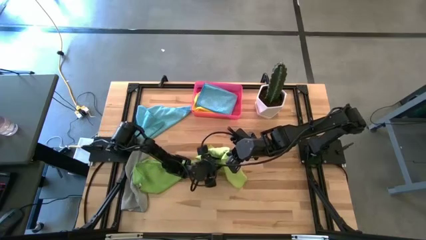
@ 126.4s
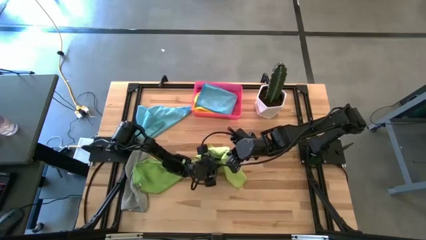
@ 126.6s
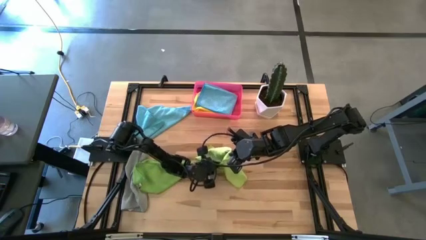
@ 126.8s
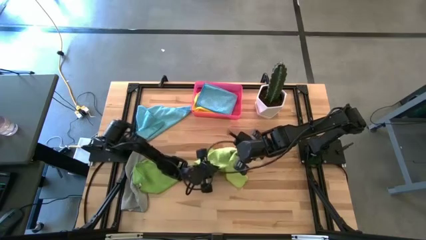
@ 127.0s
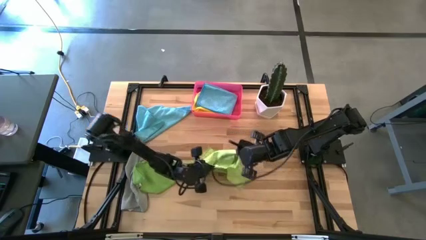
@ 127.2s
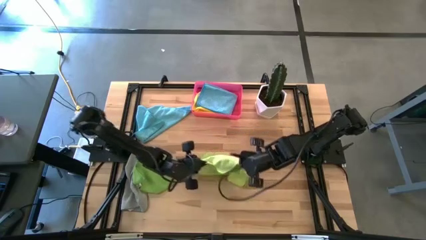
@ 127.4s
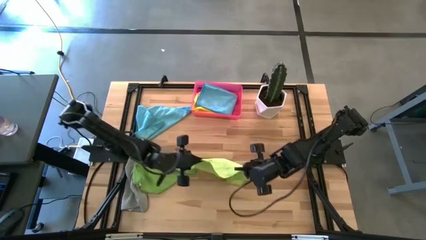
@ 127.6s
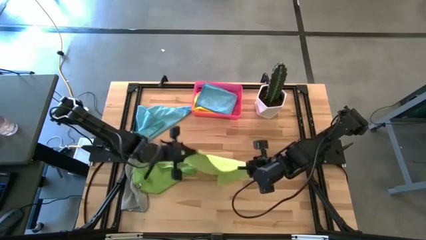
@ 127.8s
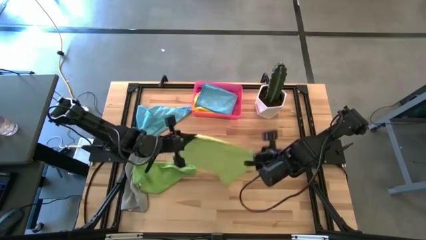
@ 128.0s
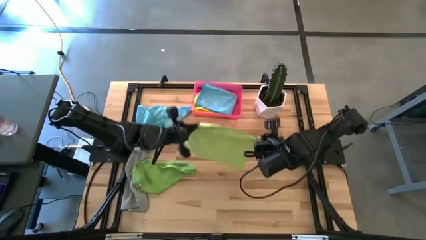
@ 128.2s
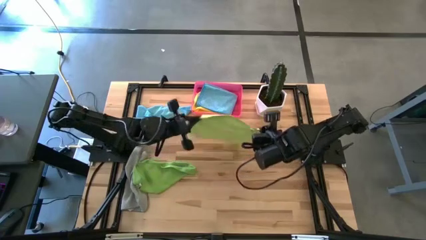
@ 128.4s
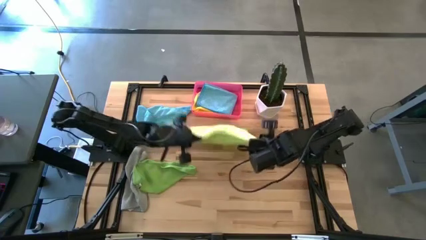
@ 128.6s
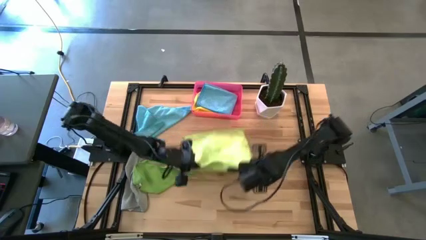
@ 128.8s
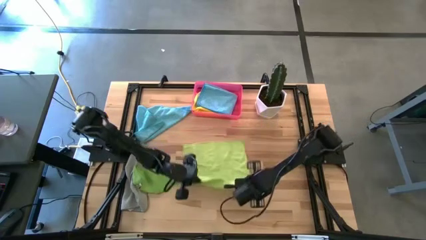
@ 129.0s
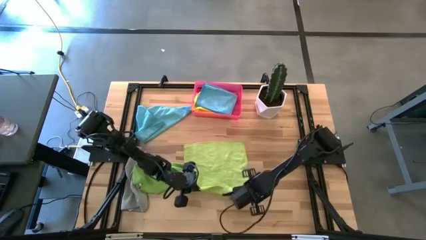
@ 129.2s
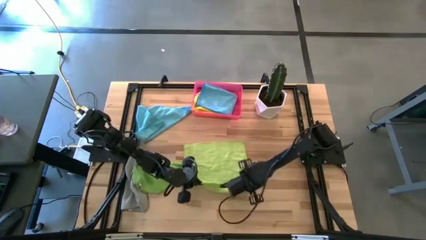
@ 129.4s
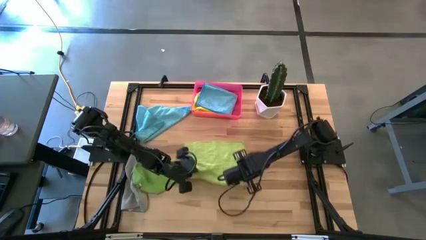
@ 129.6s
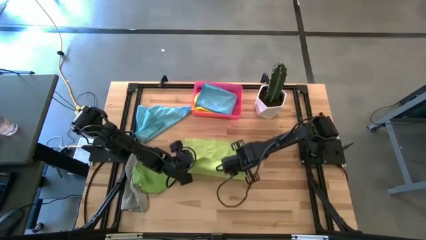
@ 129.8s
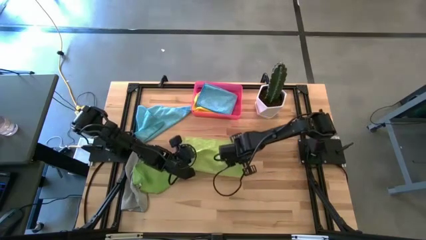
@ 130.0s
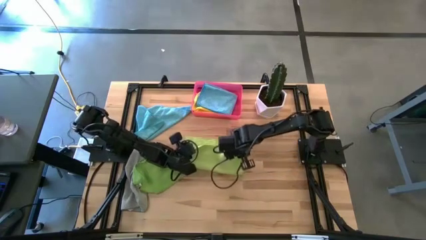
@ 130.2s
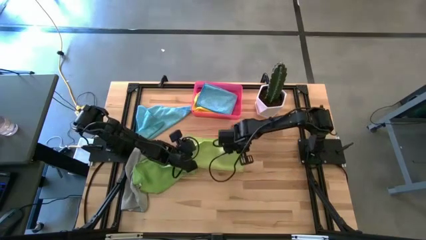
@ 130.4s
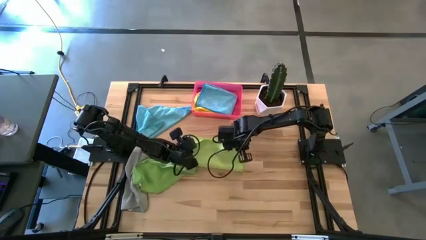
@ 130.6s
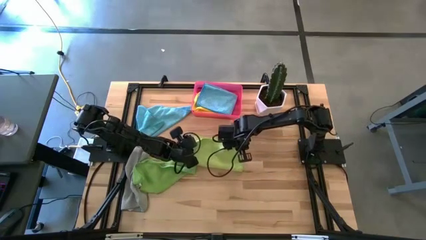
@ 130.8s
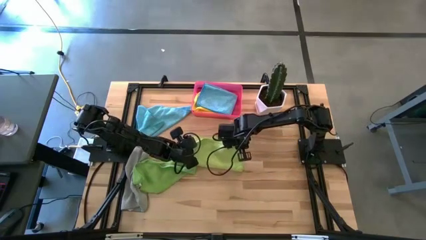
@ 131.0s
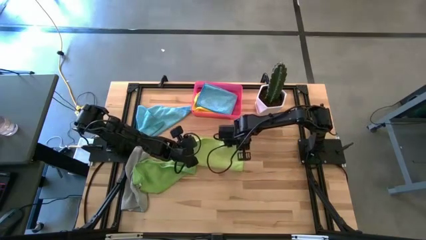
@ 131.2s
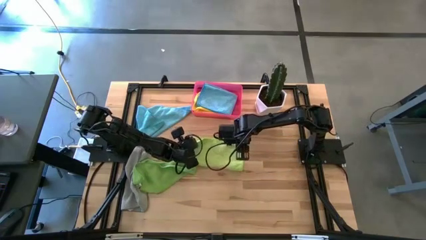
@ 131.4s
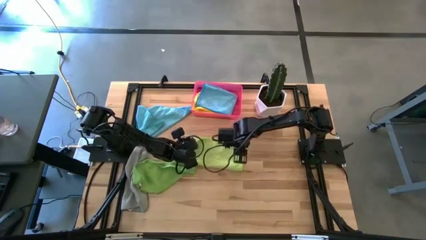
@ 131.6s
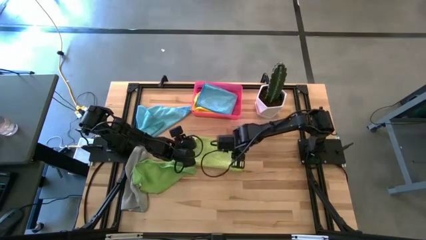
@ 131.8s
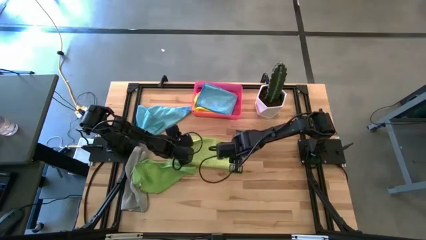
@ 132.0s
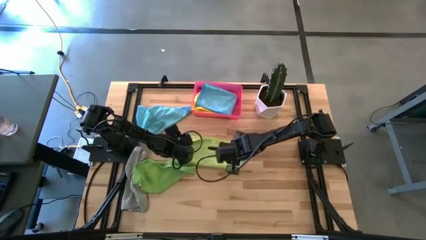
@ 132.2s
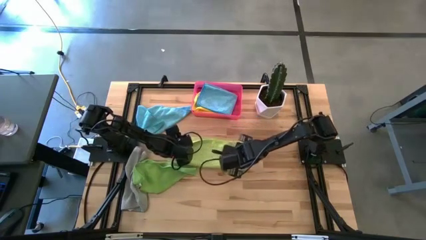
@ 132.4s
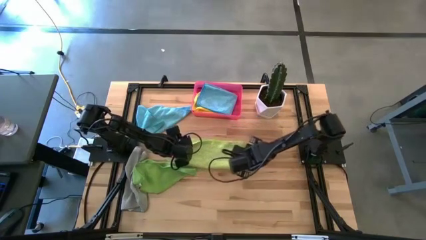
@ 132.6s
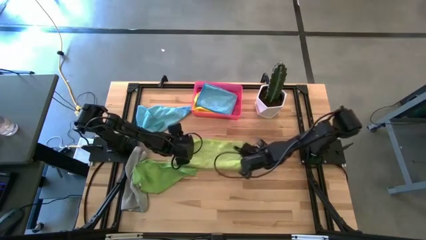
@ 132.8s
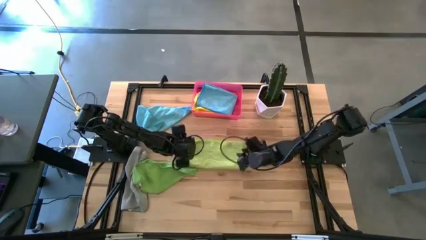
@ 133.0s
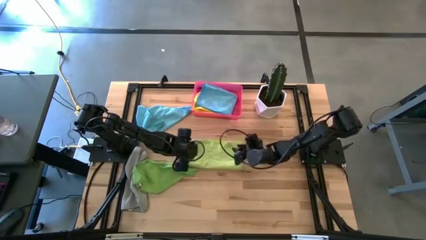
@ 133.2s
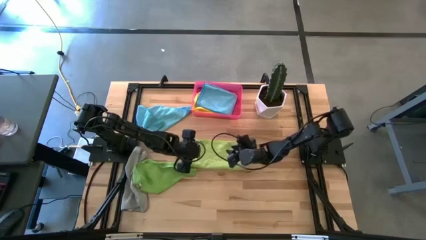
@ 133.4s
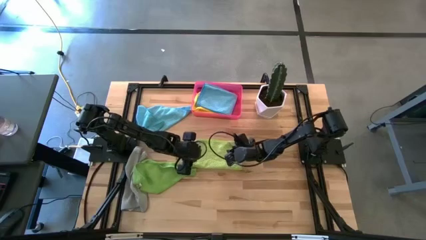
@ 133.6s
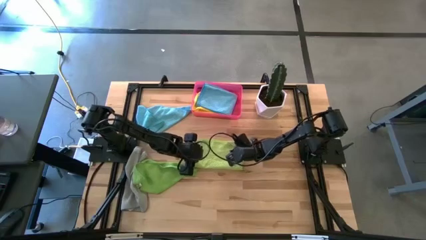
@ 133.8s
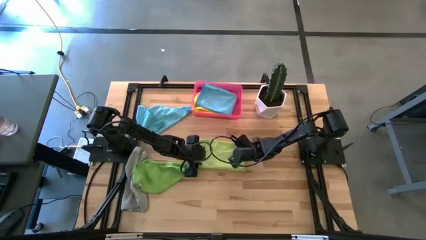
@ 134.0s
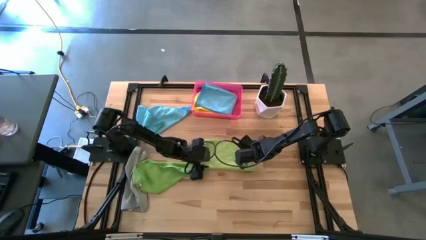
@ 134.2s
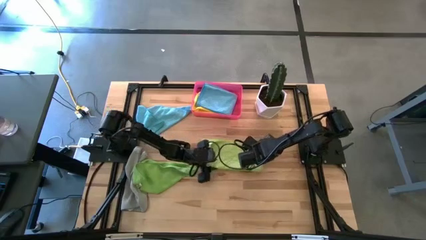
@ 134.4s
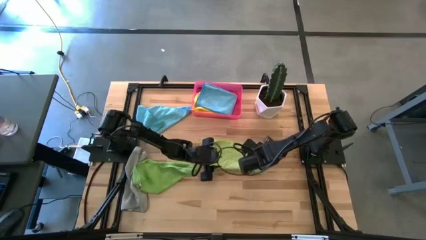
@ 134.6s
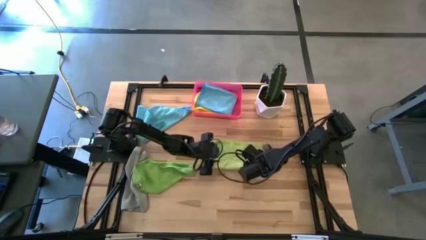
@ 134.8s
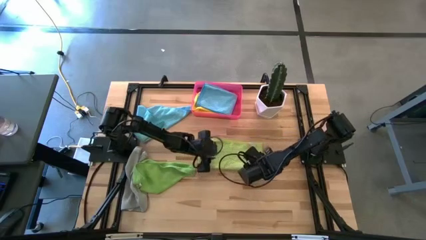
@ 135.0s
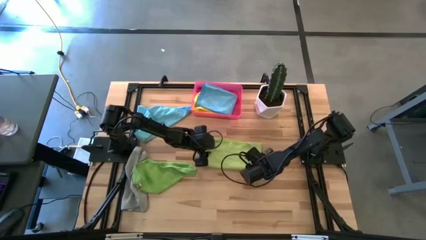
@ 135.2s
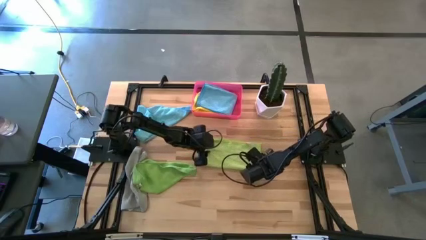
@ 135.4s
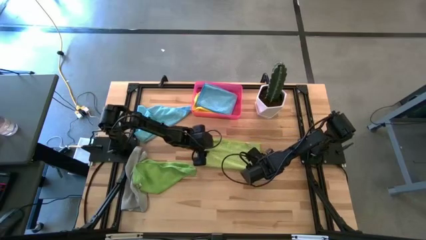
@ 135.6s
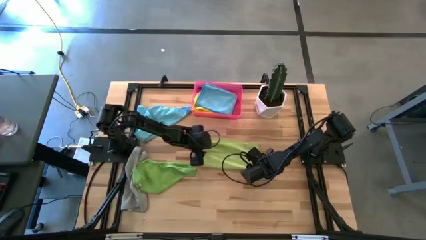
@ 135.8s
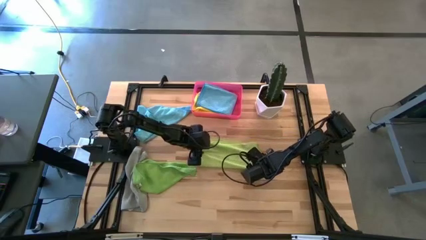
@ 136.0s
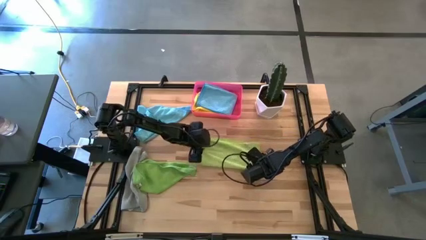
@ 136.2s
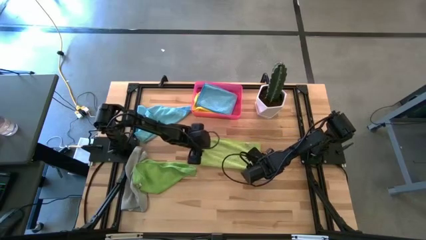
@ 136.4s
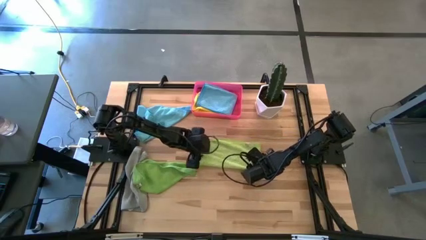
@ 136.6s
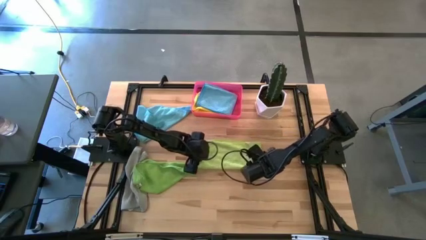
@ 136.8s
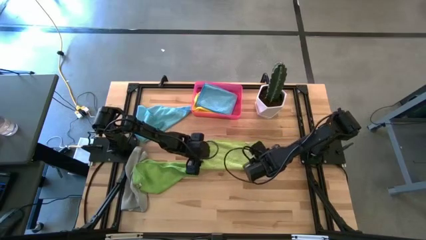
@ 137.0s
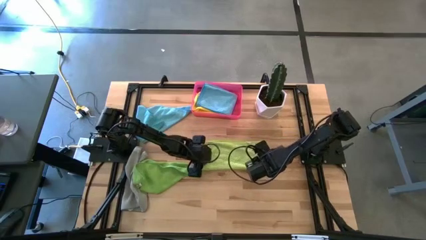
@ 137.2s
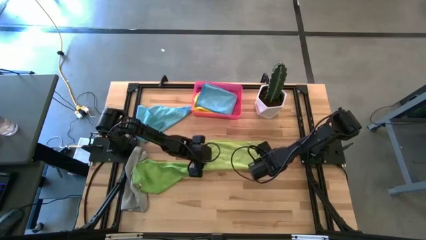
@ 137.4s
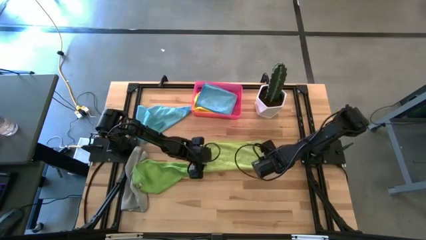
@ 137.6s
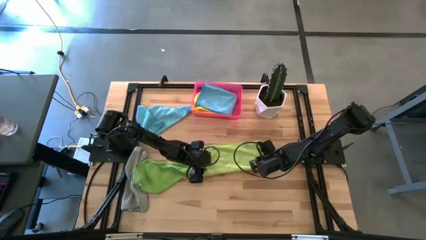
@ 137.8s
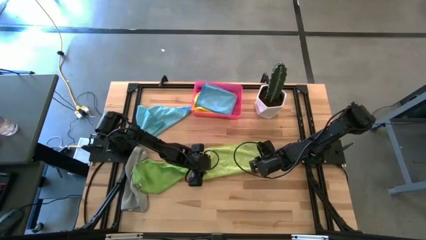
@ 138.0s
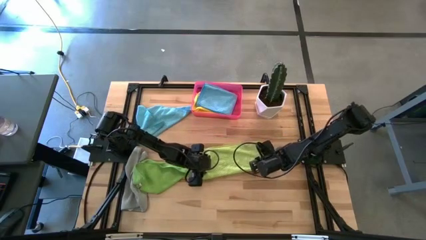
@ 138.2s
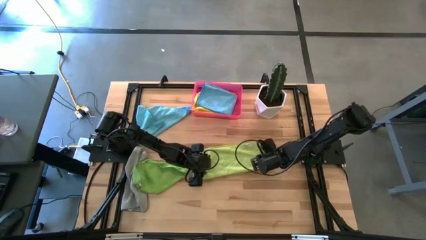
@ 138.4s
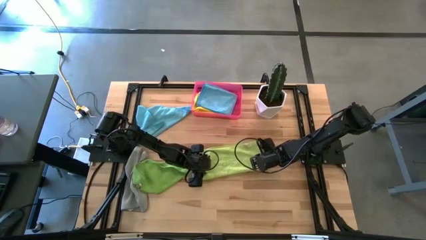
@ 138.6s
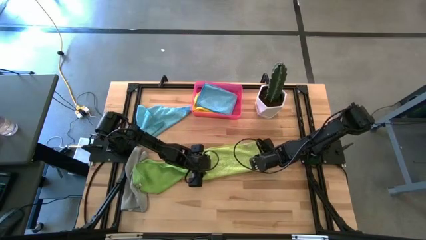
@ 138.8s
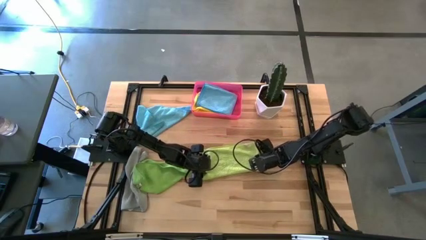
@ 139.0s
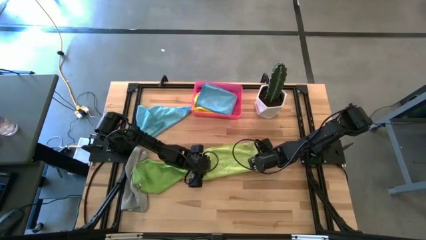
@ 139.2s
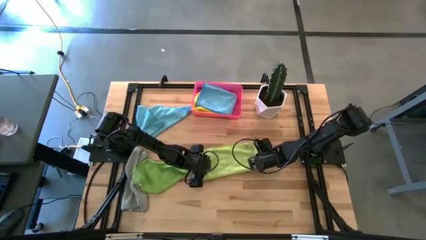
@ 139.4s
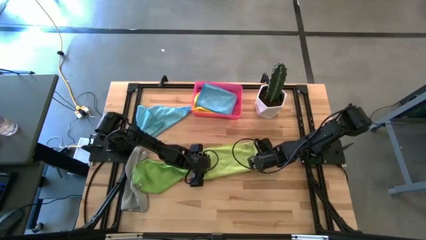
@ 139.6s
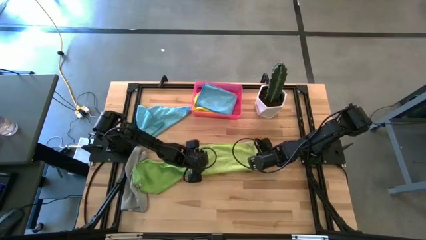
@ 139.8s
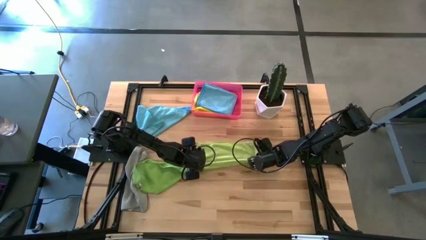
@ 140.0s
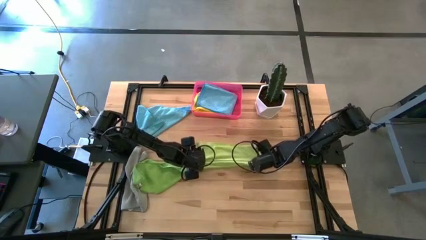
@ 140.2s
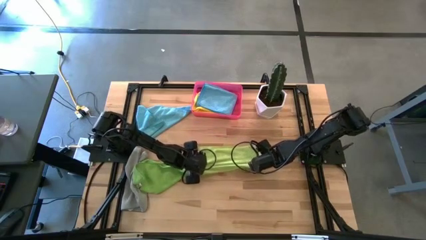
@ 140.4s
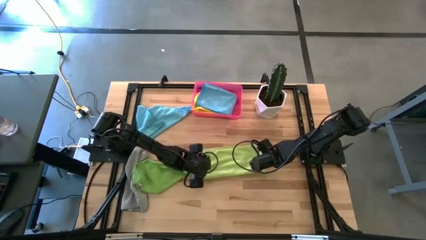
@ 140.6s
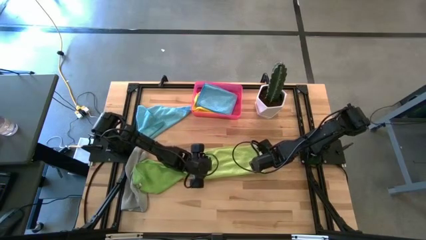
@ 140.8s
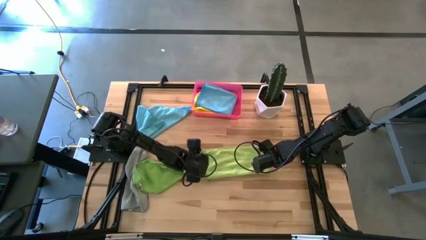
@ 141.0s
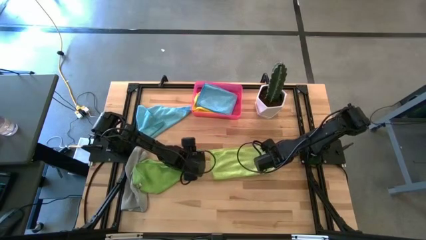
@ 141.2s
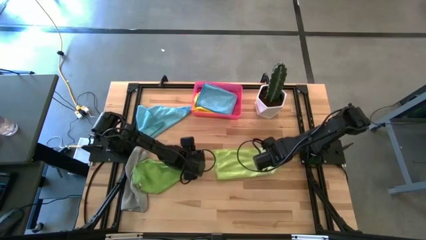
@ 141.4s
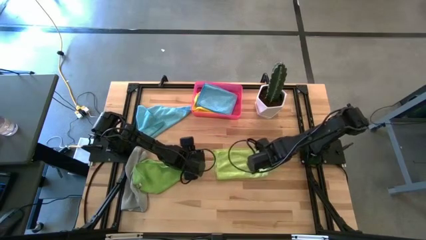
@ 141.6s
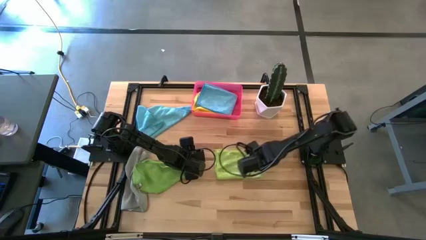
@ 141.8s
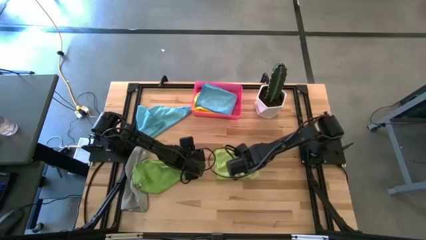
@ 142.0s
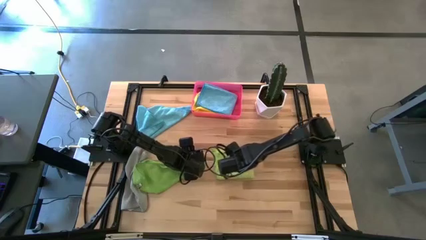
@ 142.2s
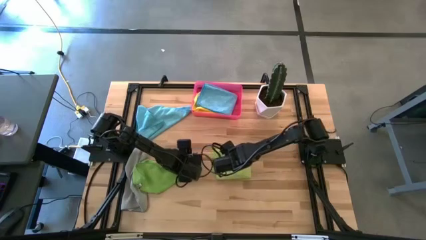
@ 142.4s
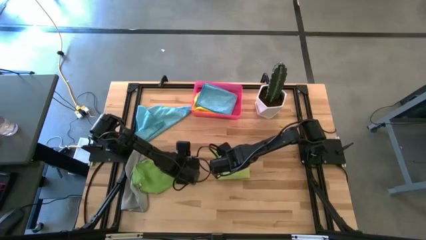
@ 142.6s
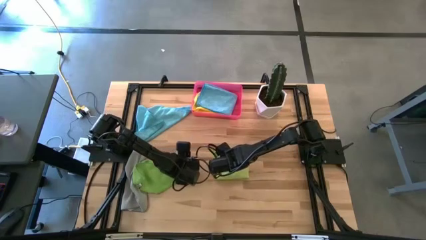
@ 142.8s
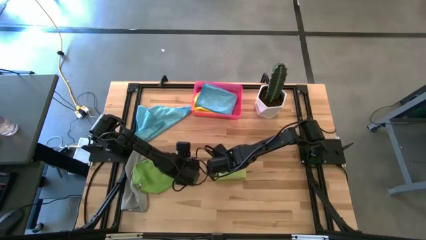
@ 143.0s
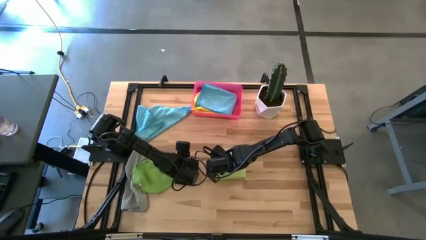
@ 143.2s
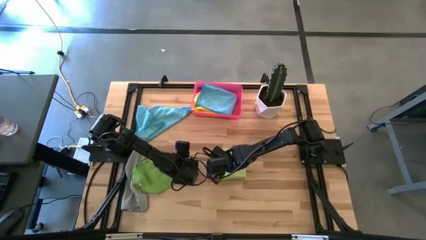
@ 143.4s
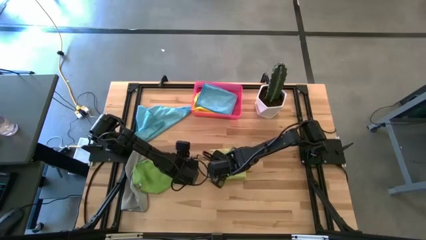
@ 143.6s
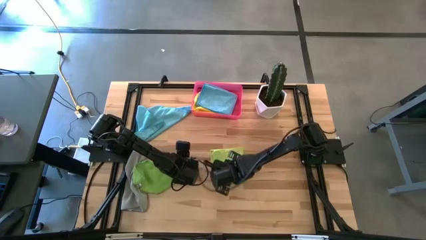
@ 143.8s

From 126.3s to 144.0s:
Task: Fold microfiber towels
Fold the light green microfiber cloth on the table
